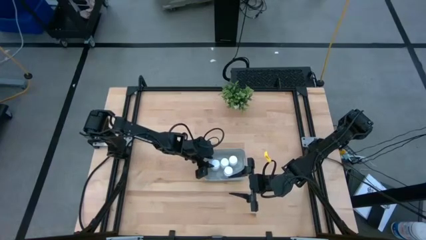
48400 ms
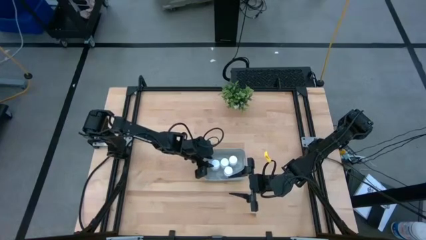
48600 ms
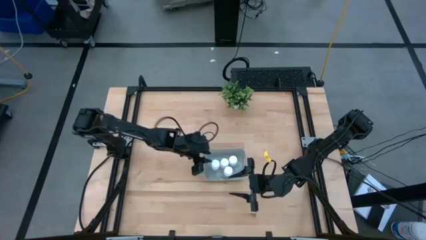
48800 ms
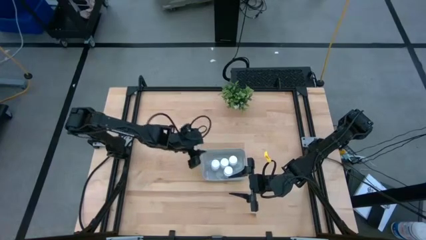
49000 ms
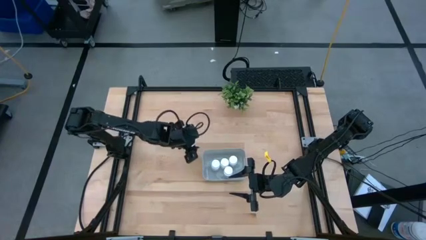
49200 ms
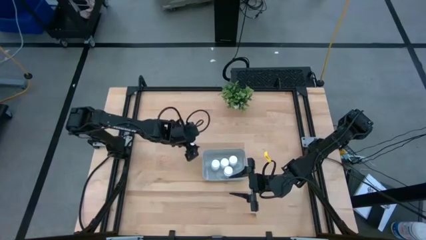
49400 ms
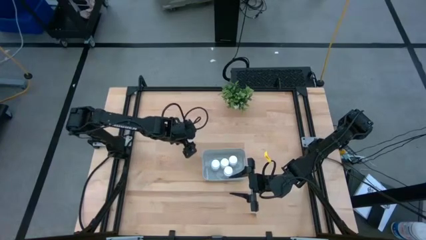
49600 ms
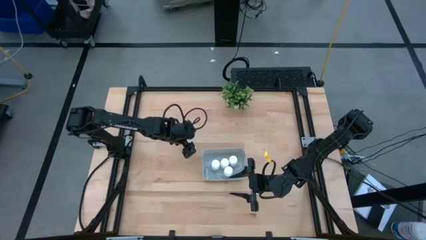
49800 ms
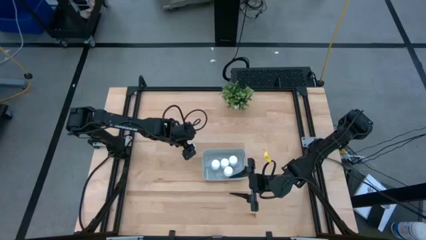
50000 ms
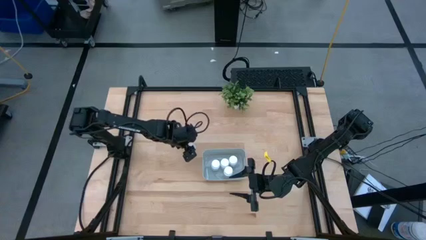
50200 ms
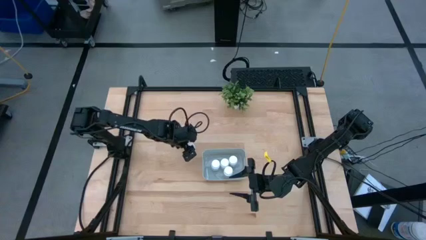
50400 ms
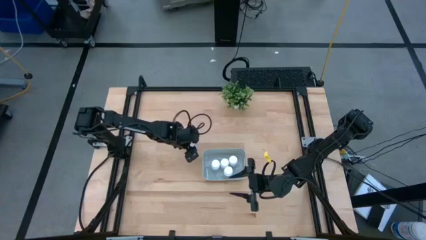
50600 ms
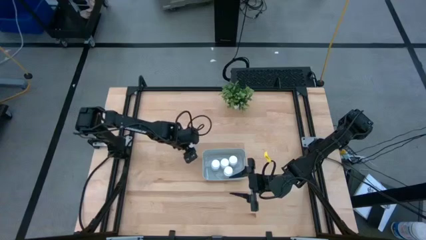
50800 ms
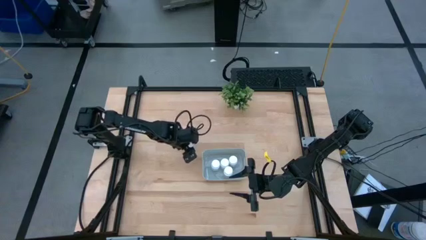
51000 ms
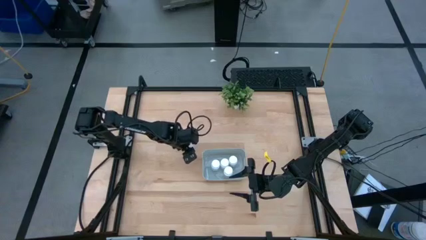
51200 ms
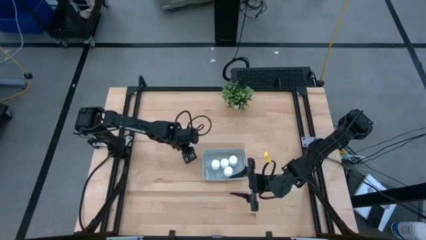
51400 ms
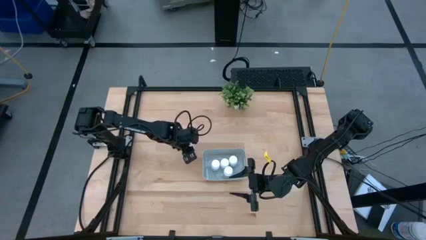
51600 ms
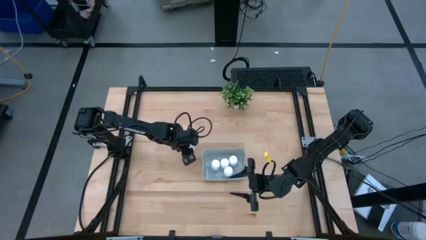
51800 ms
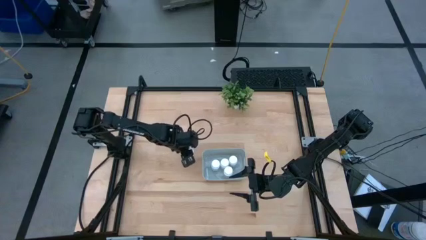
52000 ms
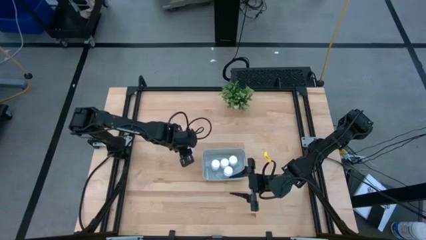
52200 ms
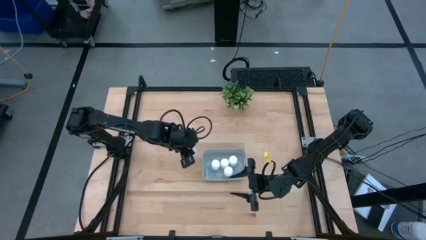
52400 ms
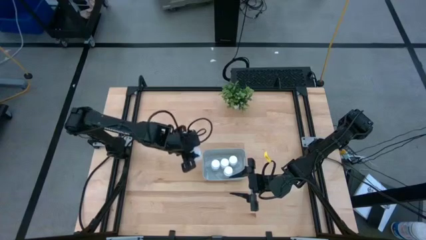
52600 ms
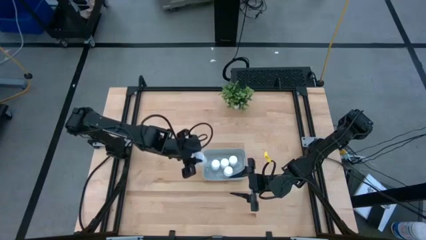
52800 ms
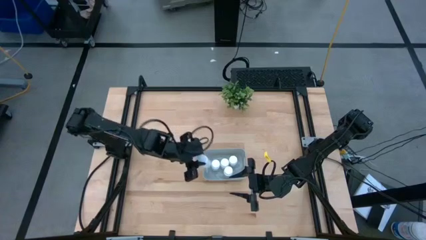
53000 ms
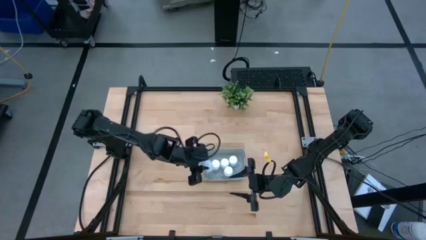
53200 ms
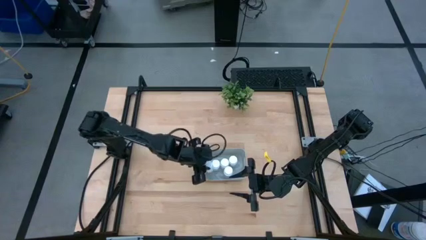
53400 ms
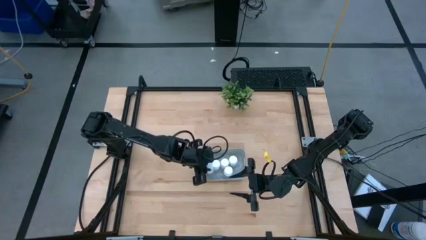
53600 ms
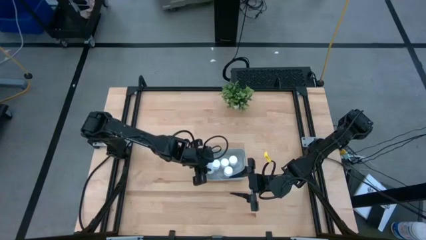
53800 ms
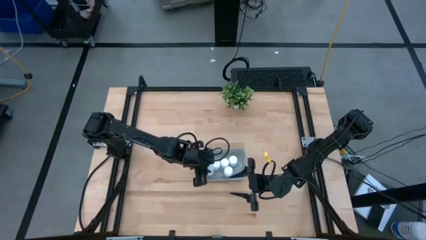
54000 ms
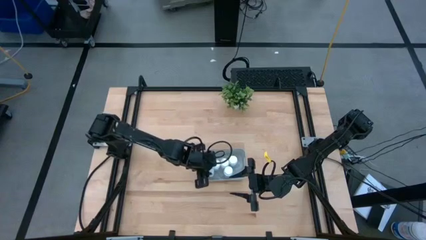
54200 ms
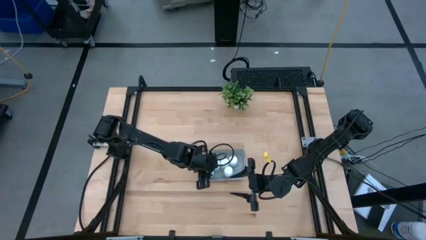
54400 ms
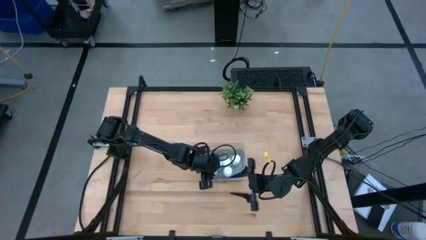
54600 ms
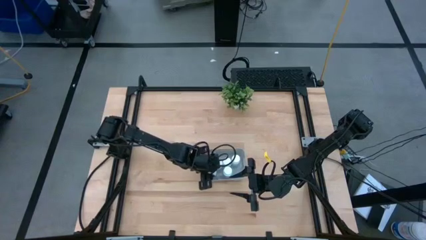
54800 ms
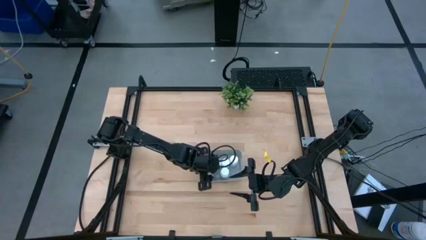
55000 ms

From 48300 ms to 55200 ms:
Task: Pick and place pill bottles into a basket
Put the white pill bottle into the white bin

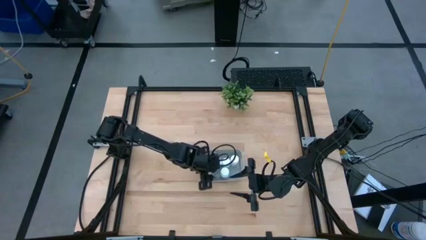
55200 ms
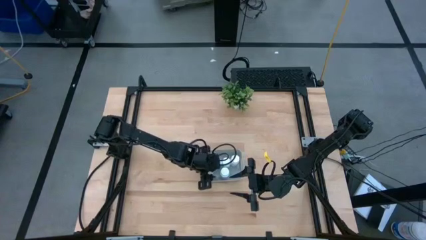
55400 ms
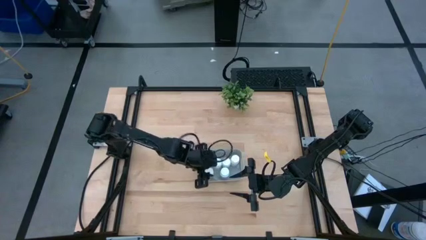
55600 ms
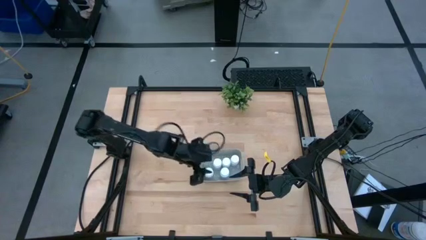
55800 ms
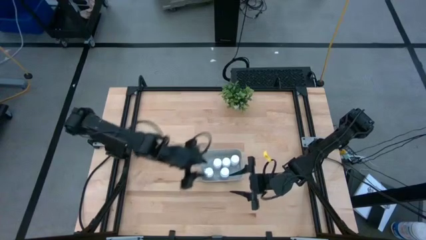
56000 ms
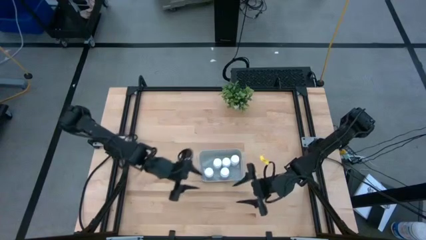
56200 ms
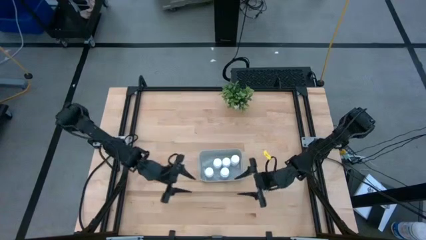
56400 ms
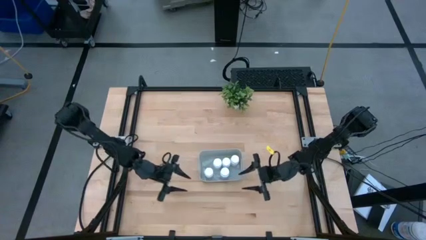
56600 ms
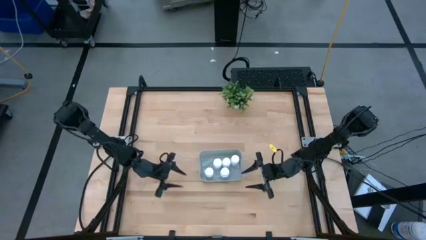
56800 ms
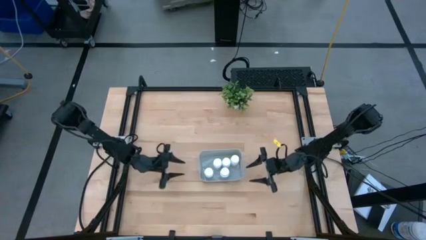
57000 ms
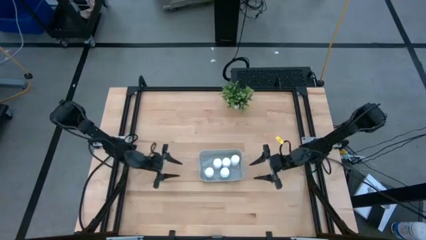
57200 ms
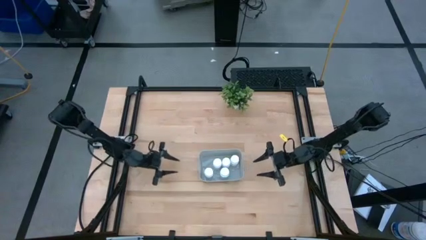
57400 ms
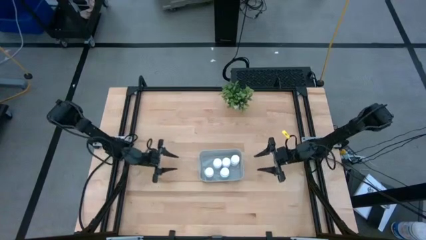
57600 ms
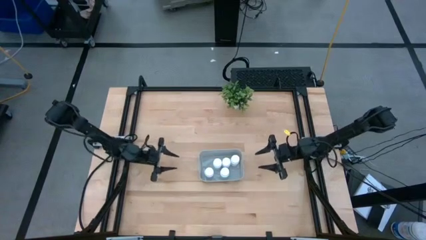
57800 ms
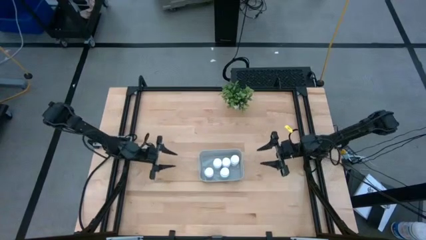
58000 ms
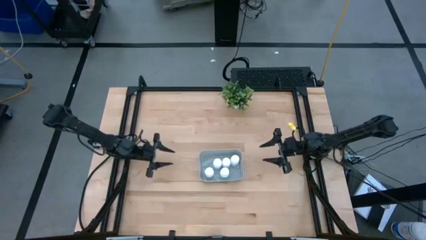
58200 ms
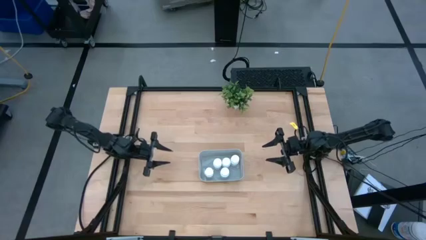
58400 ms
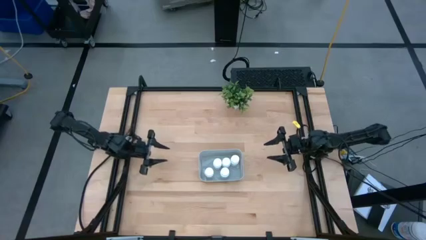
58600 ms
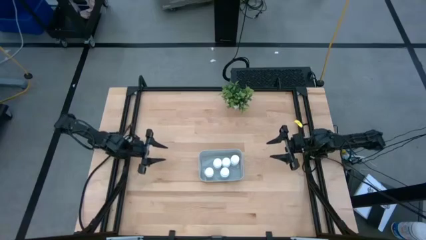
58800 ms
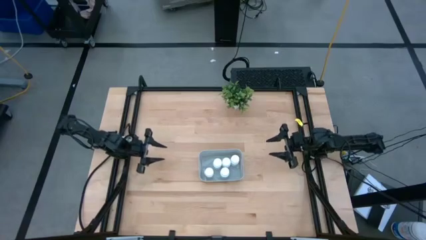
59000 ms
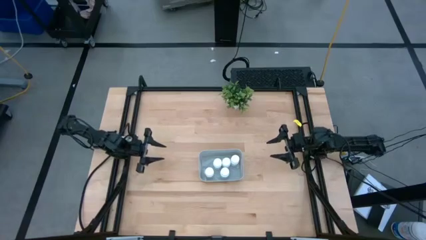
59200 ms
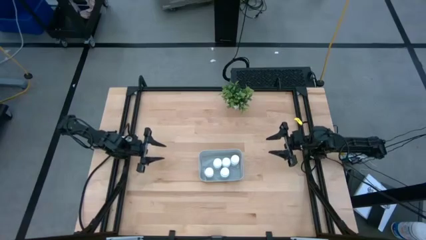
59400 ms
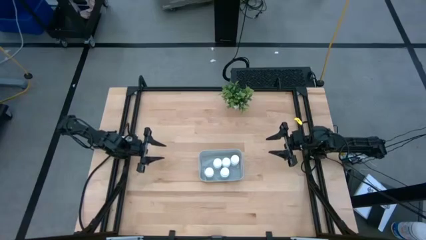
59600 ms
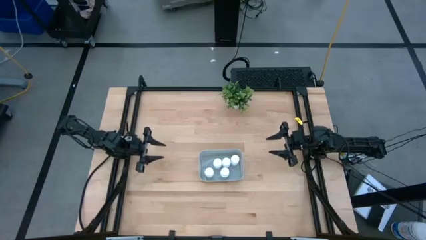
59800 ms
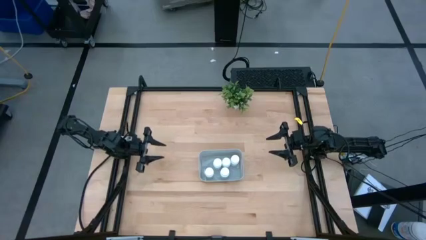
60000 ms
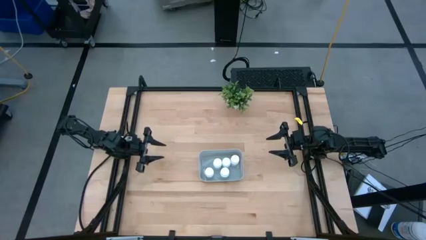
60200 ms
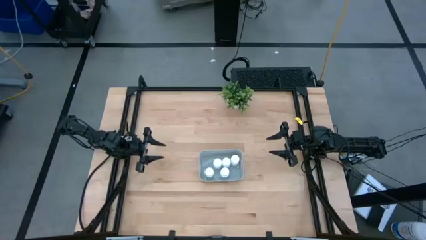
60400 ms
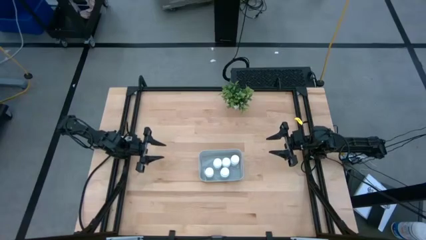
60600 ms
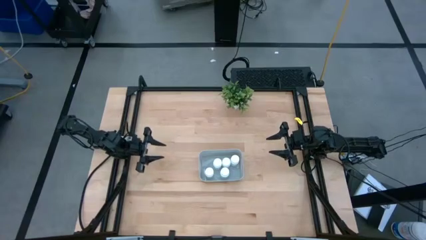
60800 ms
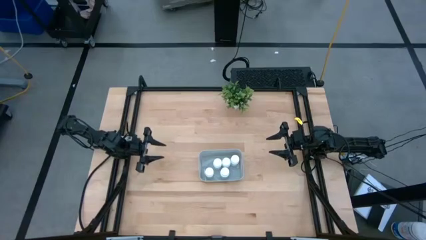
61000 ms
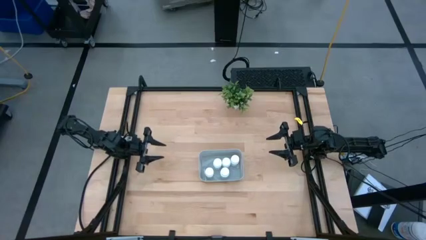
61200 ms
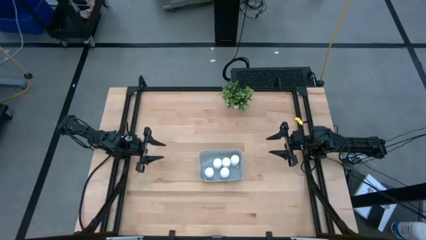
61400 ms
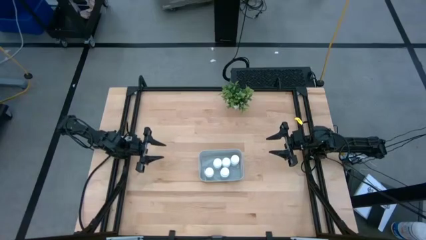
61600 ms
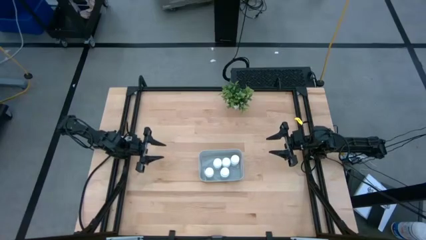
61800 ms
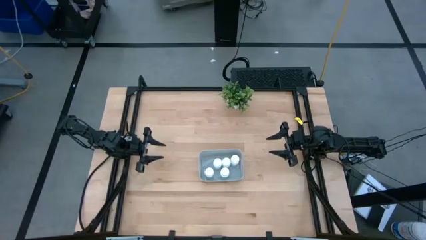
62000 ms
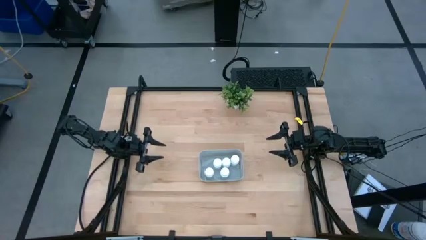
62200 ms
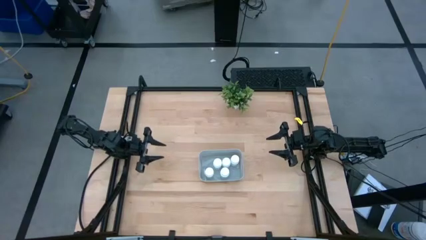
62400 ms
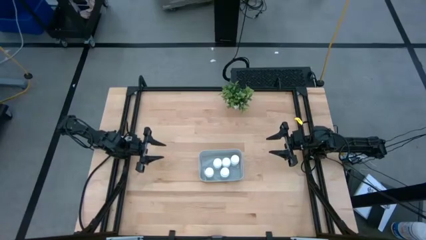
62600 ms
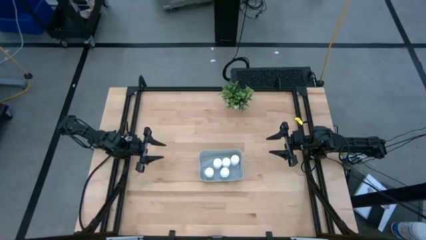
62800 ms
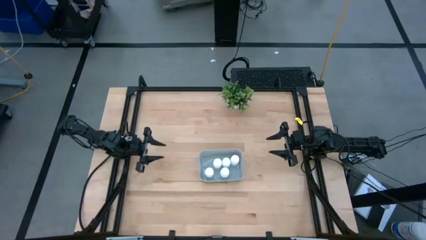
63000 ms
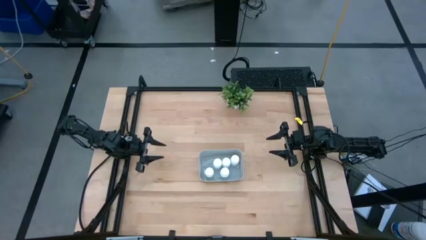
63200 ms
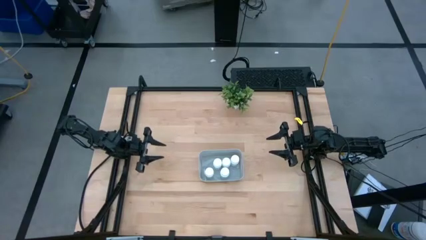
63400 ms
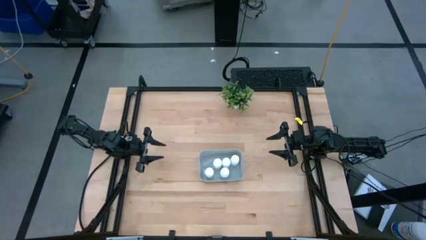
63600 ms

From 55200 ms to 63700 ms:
Return to Home Position
